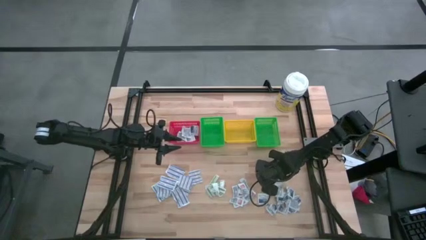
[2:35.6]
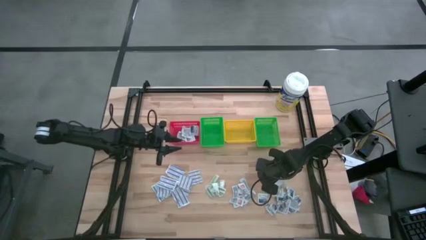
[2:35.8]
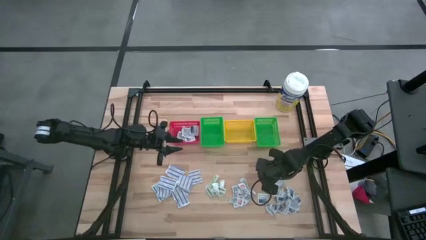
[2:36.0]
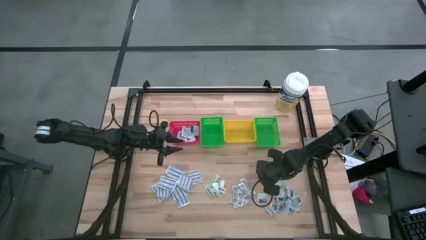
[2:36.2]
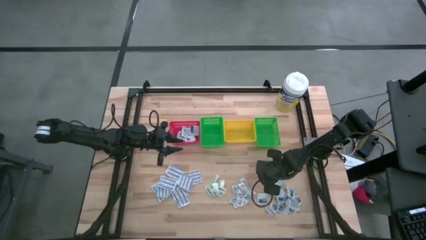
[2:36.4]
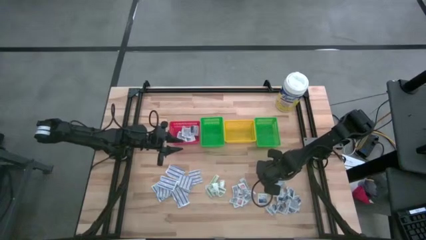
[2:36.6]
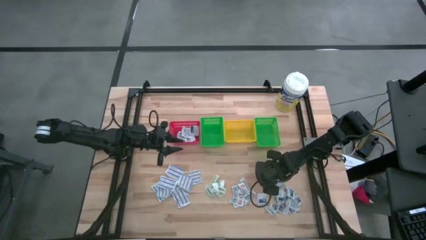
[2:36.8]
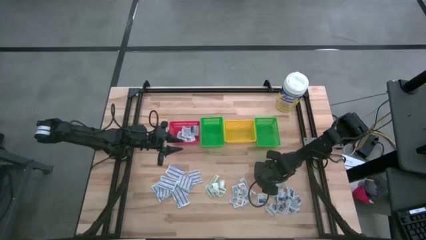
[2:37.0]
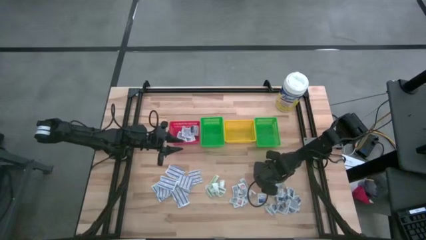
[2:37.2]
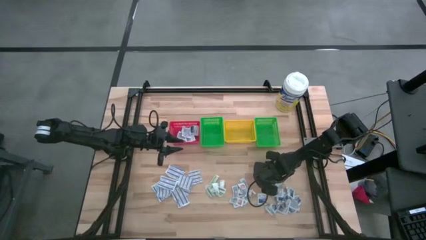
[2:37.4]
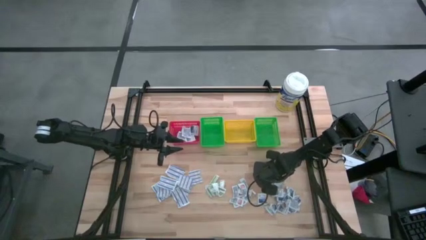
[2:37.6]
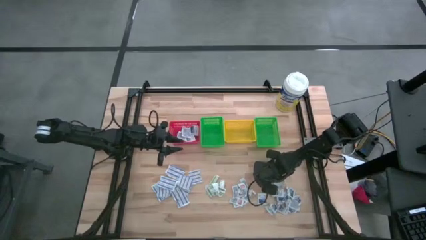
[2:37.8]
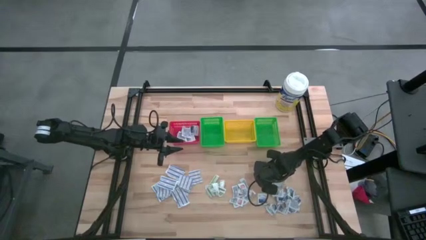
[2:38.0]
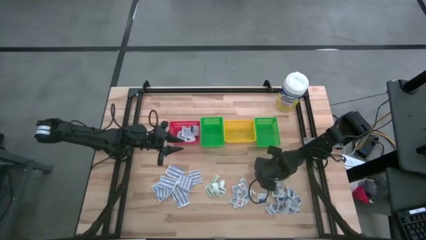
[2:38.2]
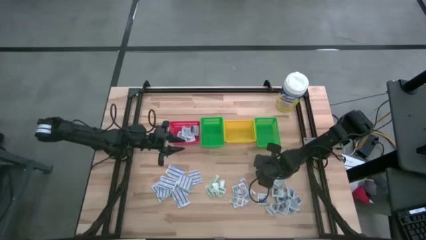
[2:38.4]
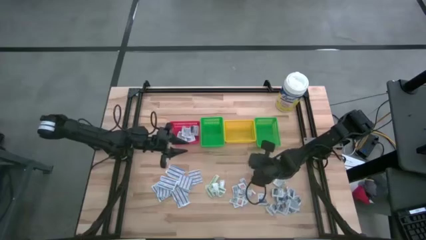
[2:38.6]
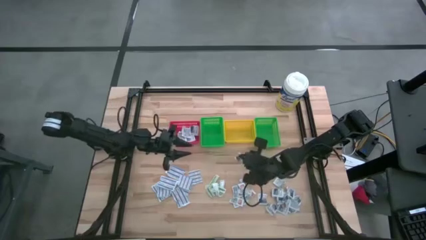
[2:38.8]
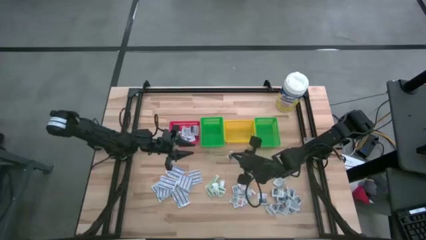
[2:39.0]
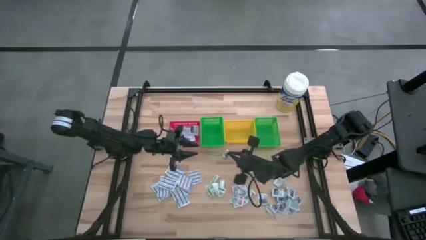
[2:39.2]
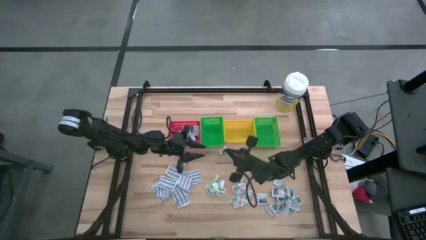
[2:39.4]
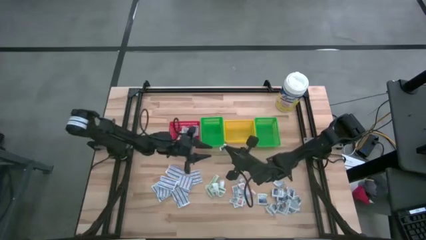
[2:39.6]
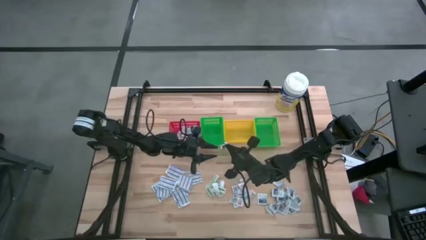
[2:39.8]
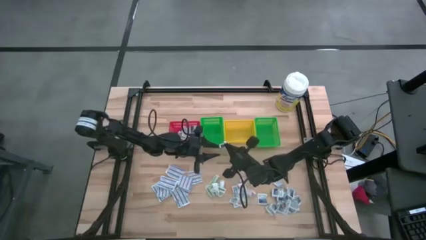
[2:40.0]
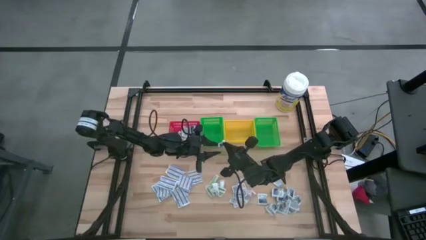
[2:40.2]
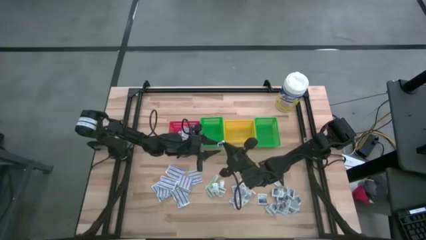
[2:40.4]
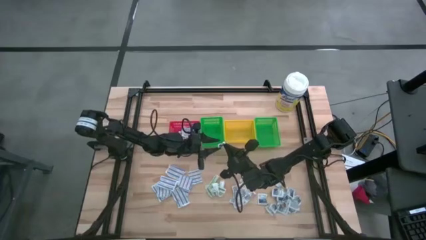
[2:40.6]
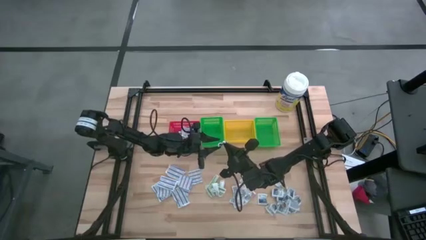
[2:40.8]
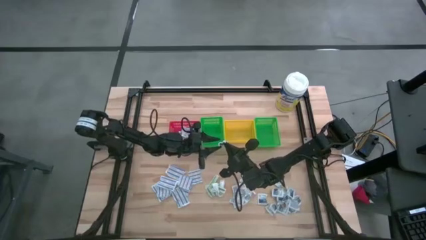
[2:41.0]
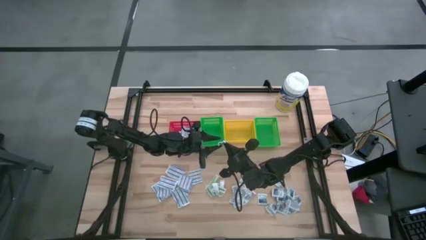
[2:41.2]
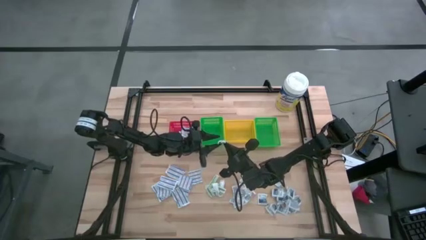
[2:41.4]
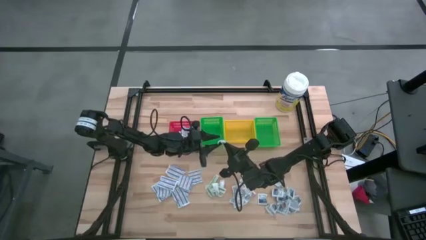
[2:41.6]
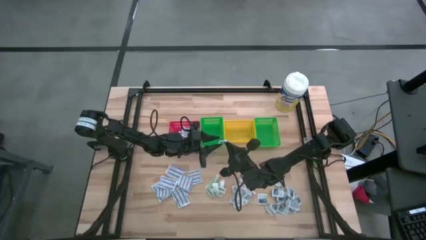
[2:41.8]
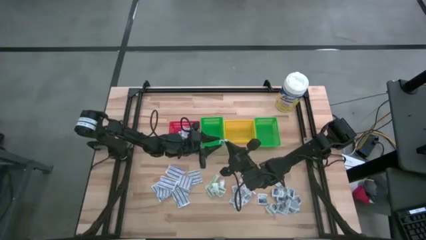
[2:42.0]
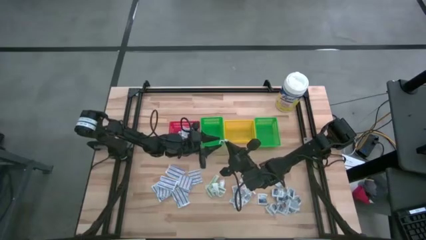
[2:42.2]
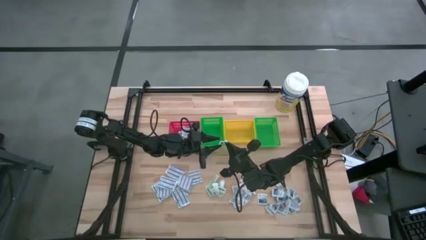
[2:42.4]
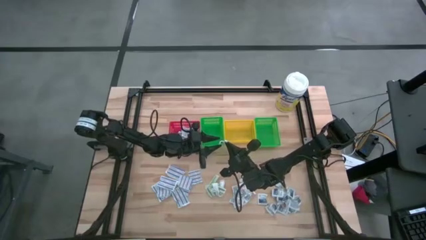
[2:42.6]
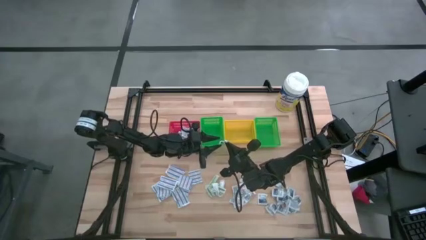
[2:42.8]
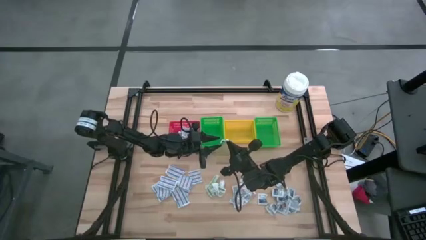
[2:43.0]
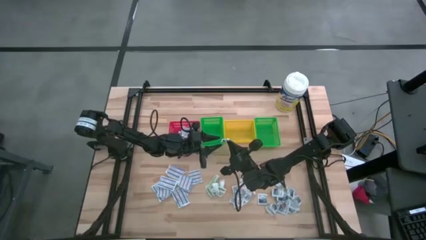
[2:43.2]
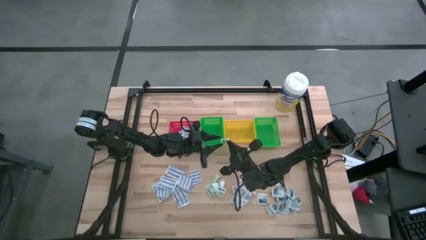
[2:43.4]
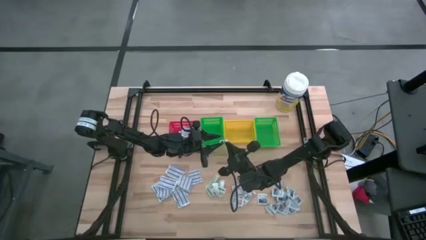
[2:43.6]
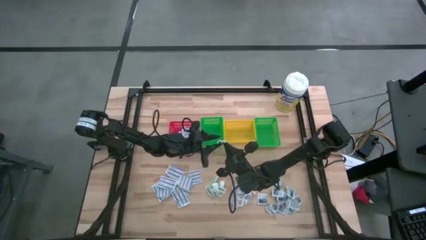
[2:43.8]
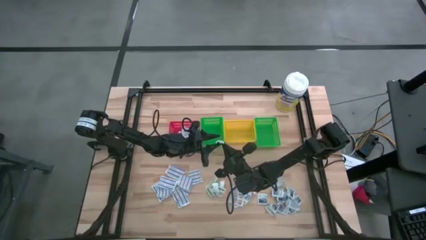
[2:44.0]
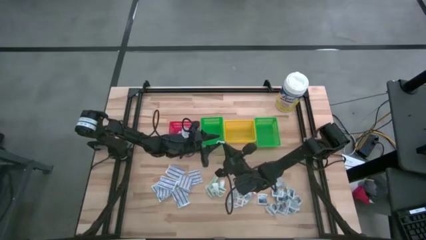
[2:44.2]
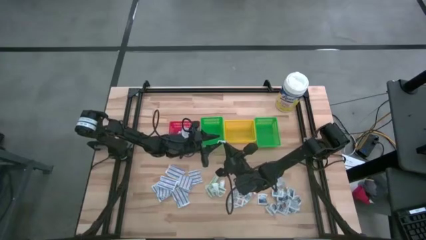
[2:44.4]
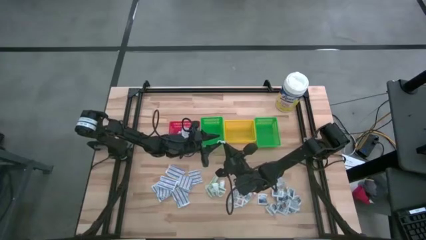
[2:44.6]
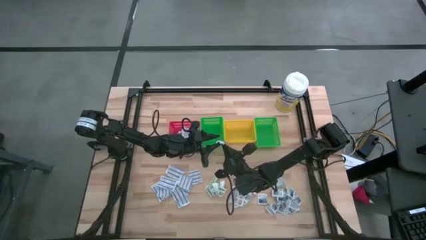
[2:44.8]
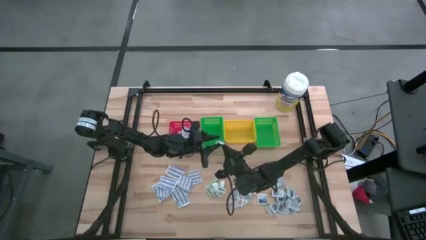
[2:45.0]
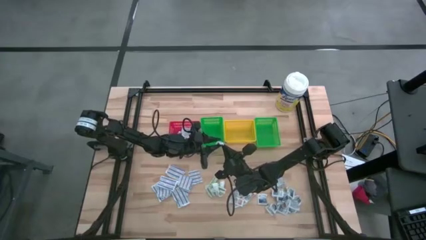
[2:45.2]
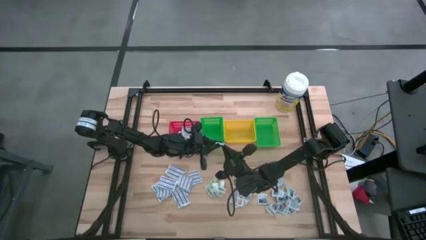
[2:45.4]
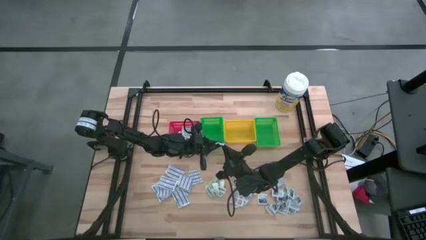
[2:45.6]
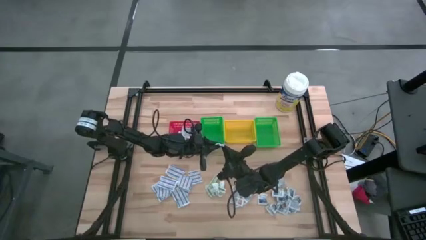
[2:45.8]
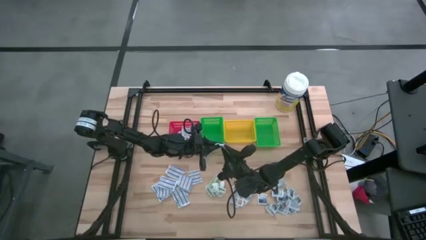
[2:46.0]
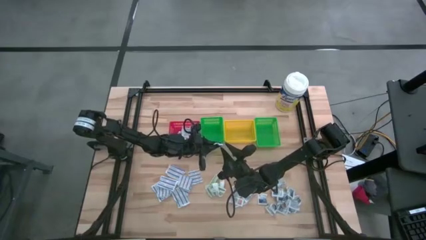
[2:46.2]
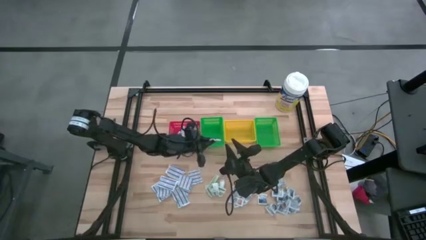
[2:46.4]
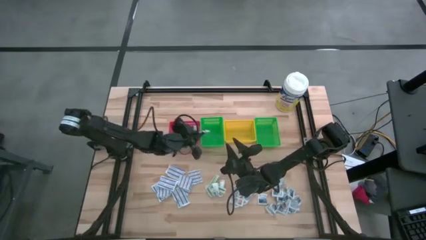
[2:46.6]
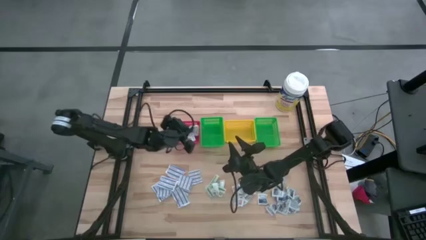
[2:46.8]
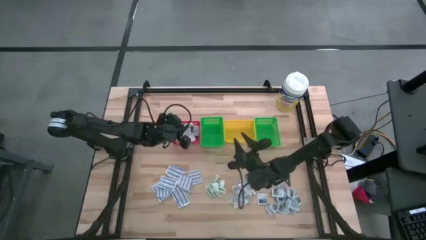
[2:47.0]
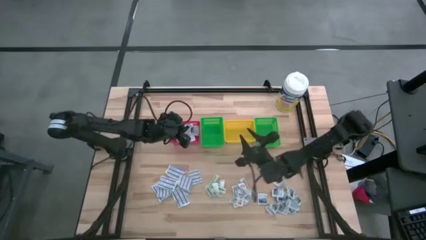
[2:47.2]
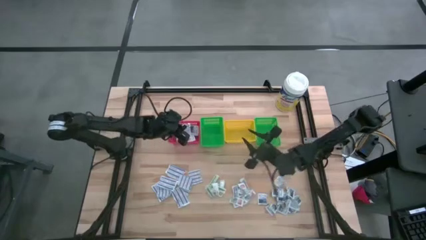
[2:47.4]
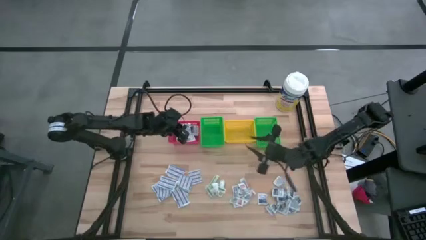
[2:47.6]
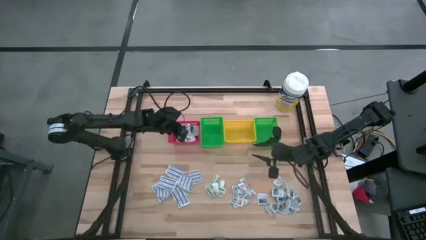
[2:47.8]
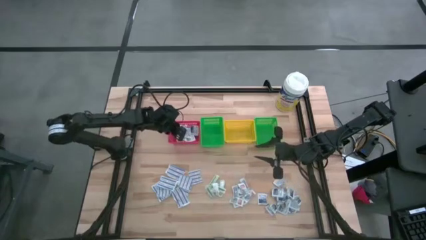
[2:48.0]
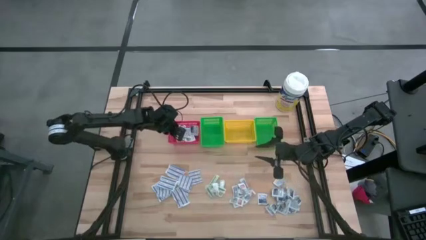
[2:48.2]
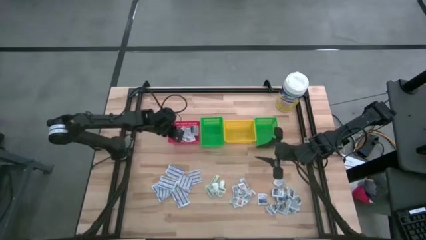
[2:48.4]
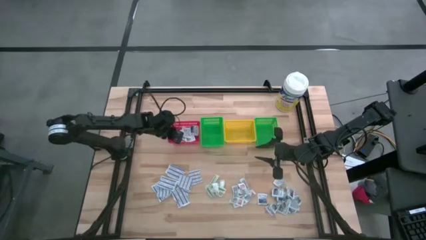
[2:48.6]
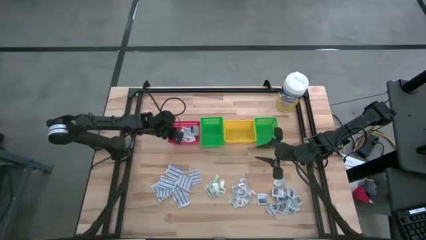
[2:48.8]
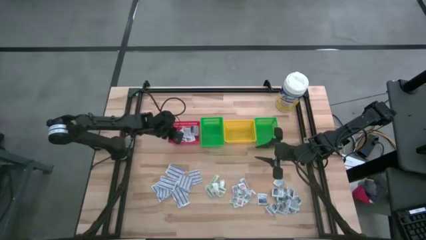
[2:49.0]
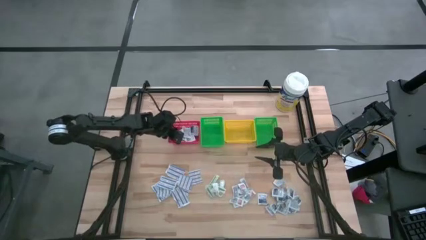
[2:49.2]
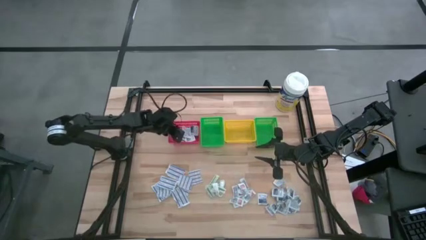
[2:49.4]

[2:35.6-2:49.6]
Task: Pick & Place First Aid Supplies
Put the alcohol pad into the red basket
